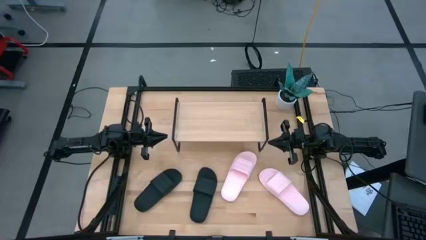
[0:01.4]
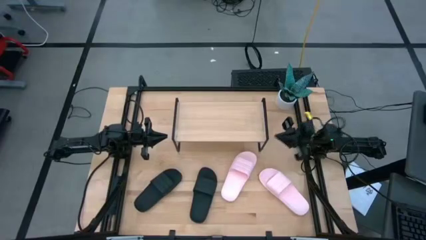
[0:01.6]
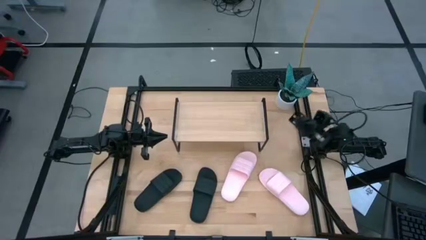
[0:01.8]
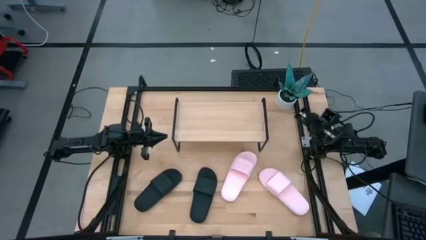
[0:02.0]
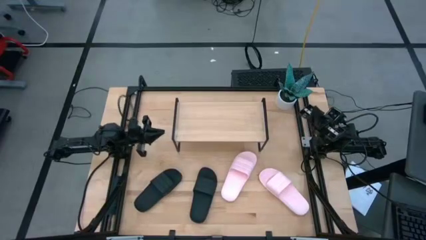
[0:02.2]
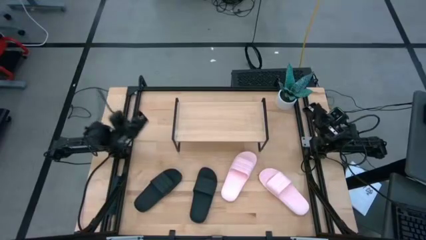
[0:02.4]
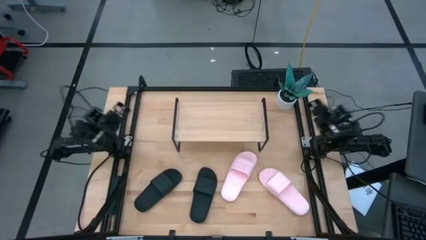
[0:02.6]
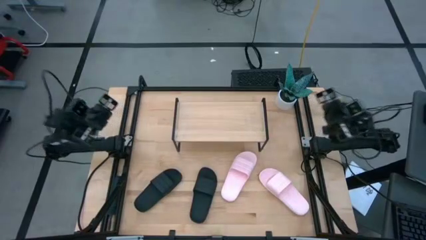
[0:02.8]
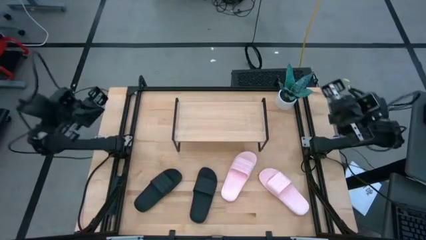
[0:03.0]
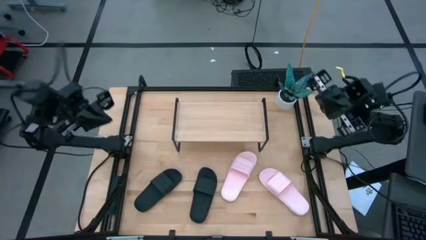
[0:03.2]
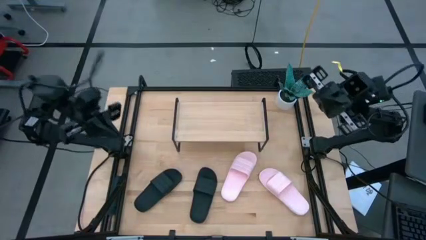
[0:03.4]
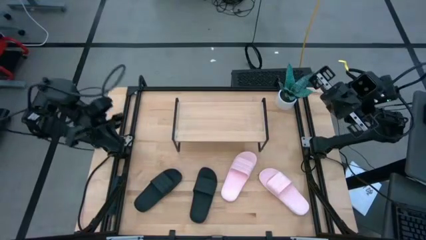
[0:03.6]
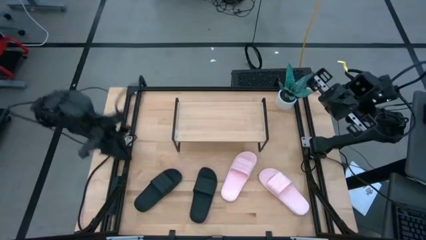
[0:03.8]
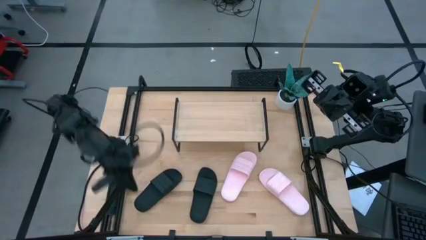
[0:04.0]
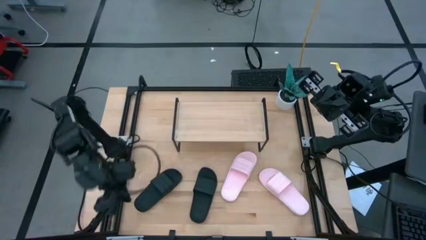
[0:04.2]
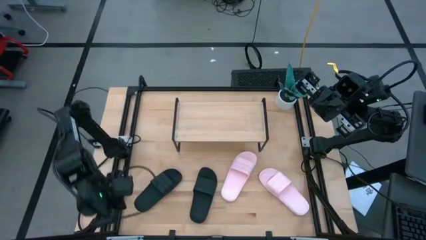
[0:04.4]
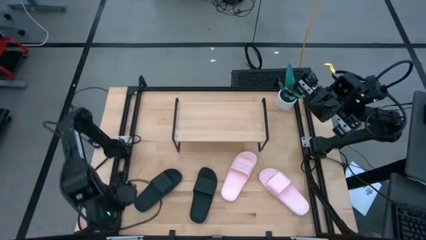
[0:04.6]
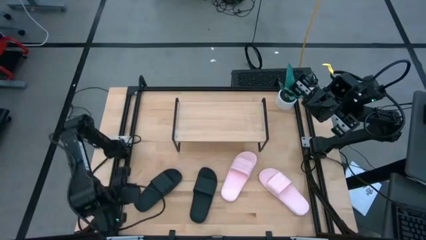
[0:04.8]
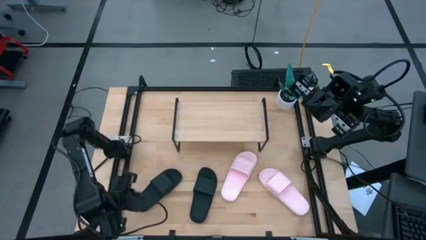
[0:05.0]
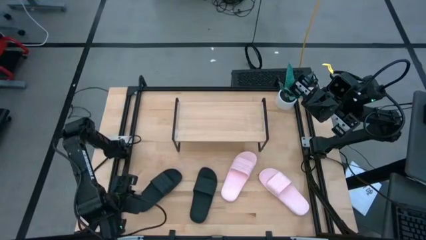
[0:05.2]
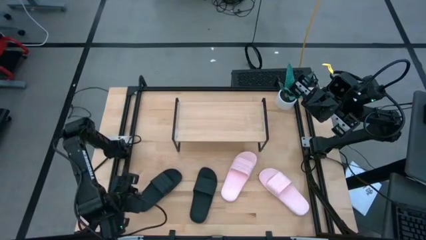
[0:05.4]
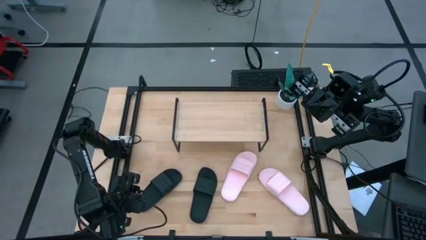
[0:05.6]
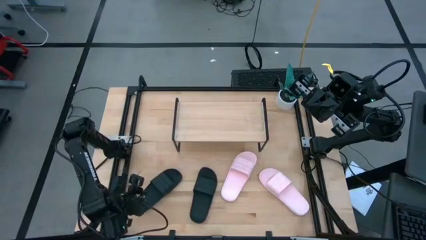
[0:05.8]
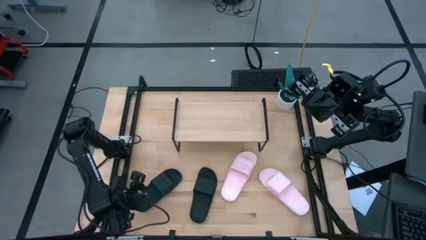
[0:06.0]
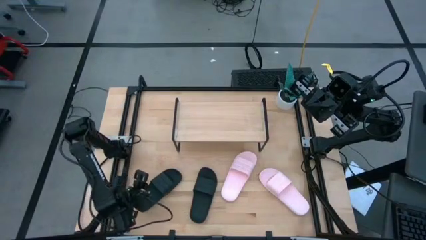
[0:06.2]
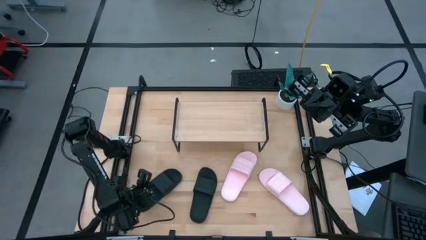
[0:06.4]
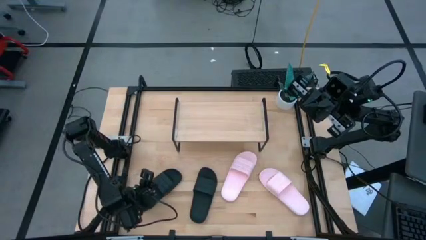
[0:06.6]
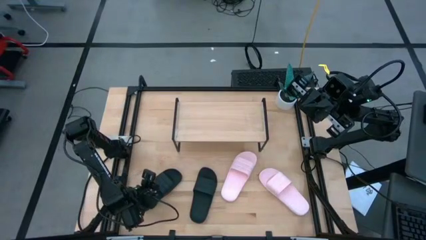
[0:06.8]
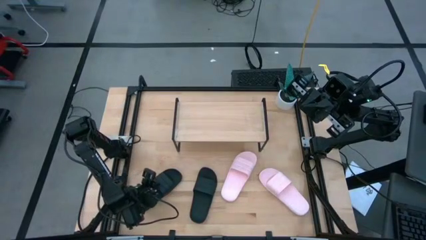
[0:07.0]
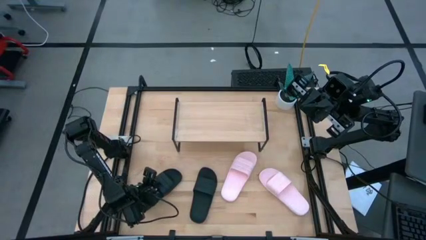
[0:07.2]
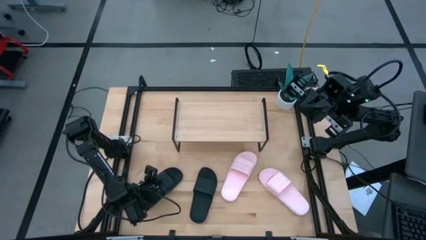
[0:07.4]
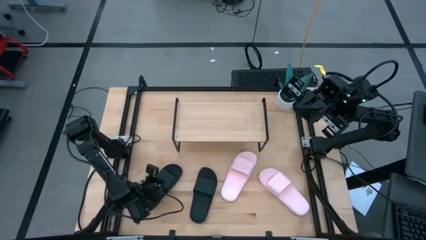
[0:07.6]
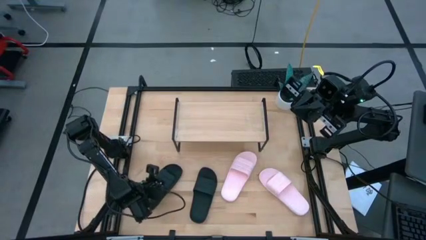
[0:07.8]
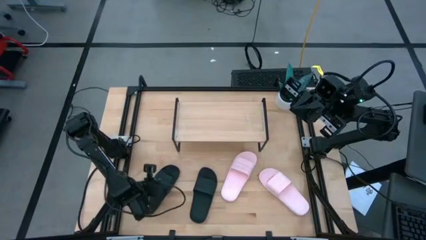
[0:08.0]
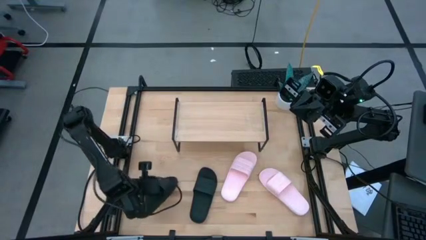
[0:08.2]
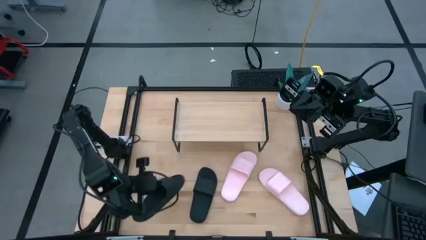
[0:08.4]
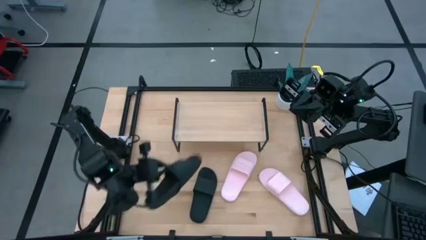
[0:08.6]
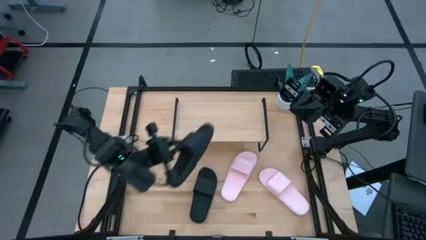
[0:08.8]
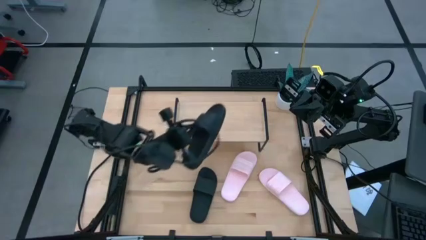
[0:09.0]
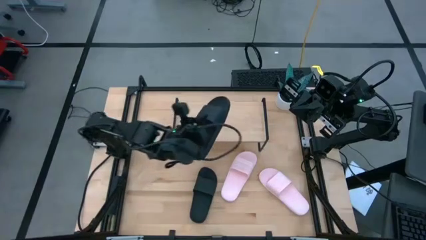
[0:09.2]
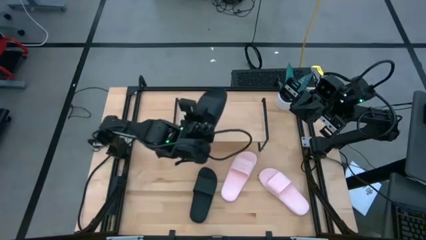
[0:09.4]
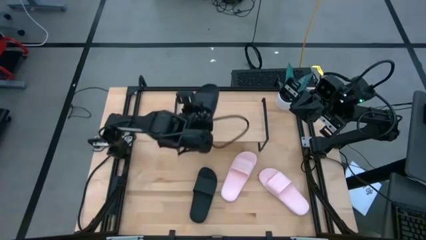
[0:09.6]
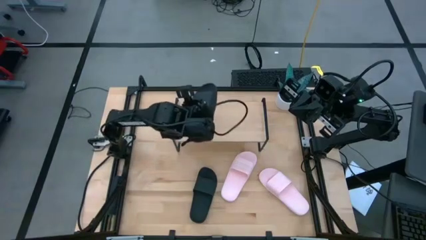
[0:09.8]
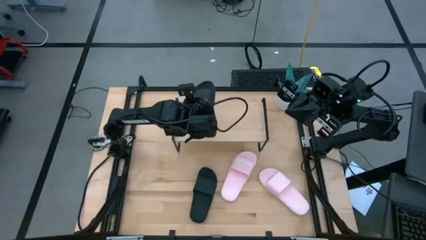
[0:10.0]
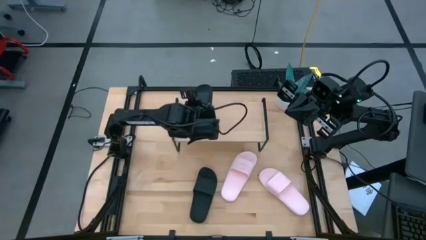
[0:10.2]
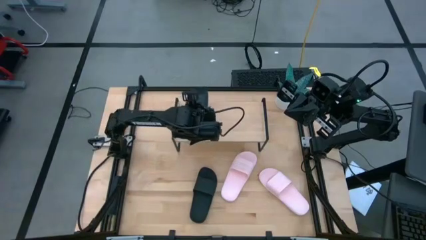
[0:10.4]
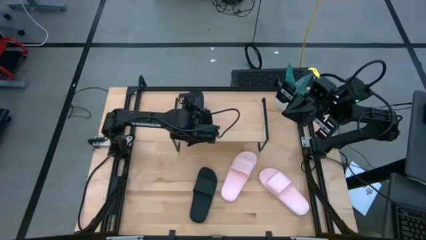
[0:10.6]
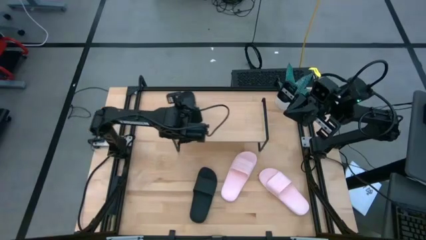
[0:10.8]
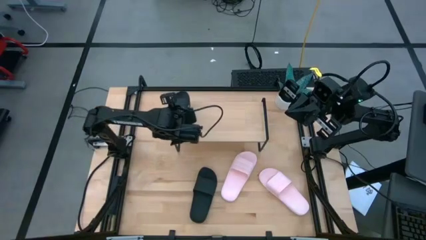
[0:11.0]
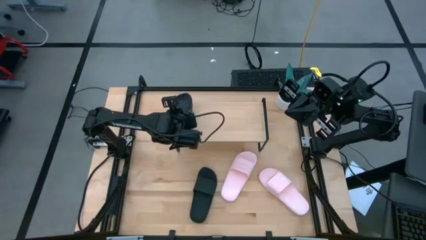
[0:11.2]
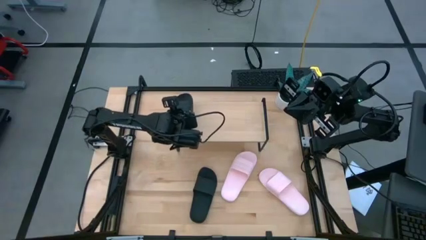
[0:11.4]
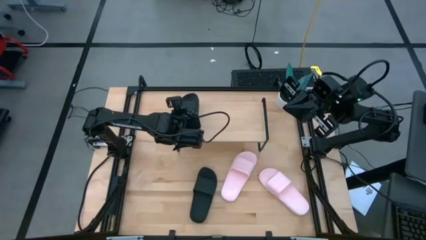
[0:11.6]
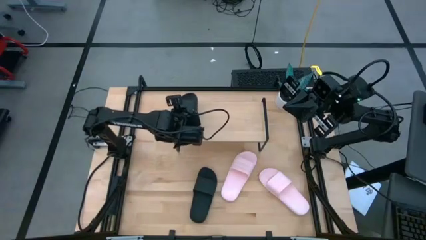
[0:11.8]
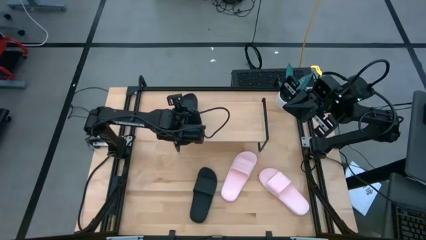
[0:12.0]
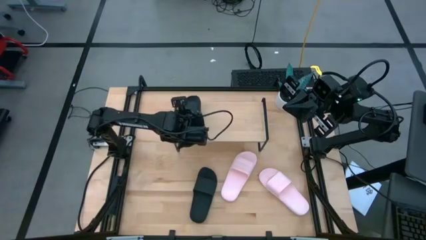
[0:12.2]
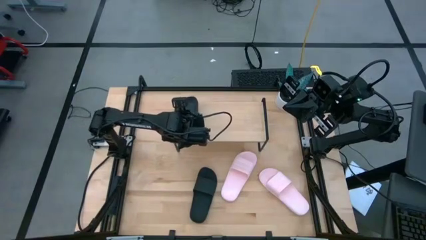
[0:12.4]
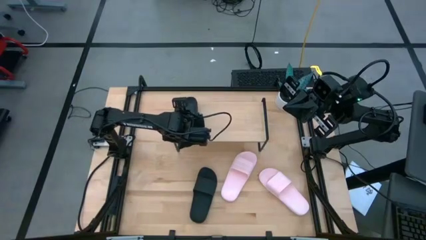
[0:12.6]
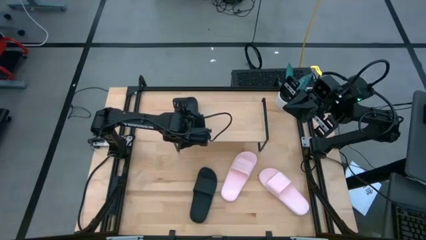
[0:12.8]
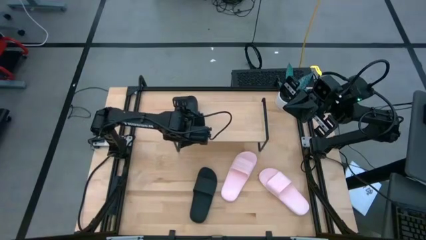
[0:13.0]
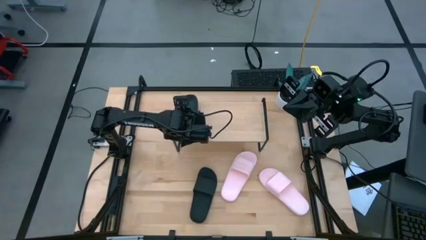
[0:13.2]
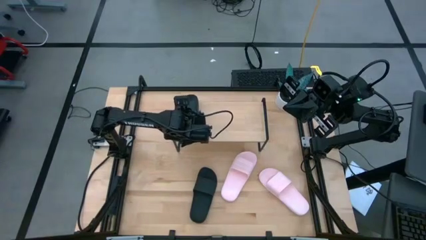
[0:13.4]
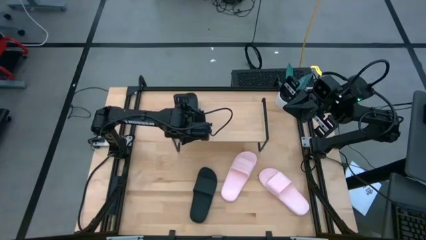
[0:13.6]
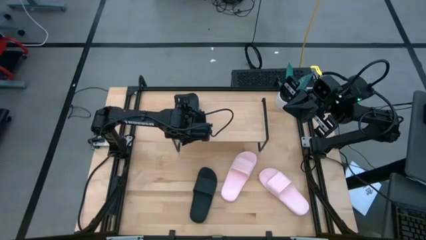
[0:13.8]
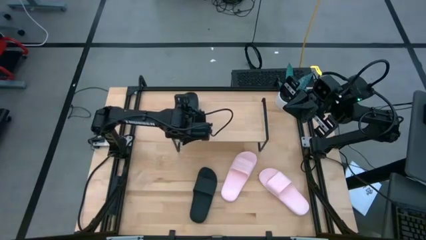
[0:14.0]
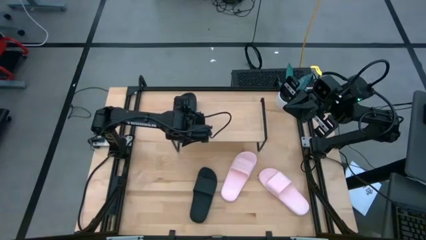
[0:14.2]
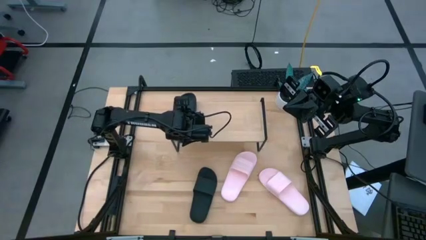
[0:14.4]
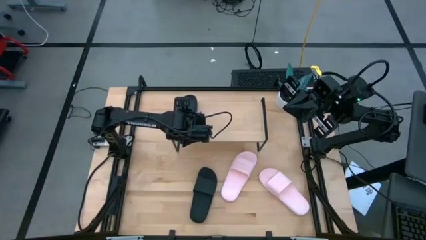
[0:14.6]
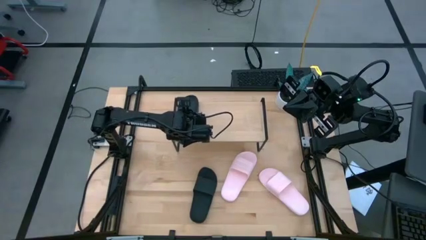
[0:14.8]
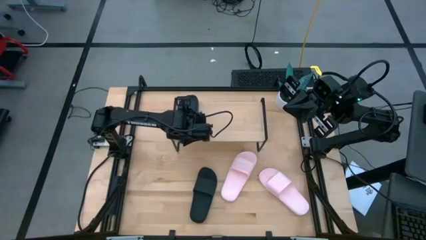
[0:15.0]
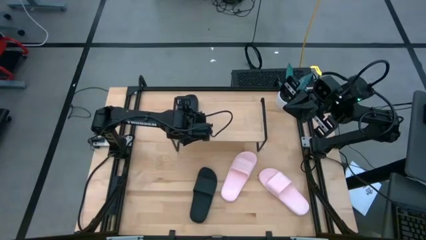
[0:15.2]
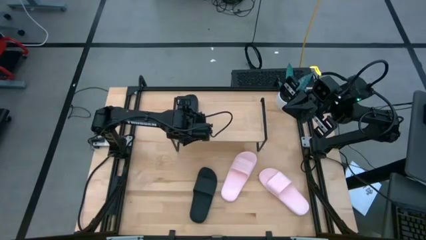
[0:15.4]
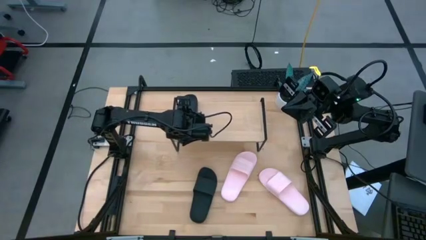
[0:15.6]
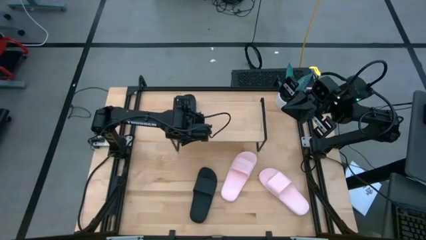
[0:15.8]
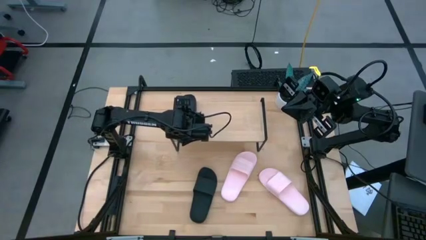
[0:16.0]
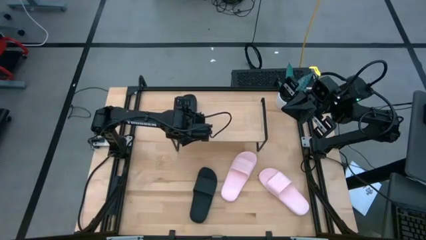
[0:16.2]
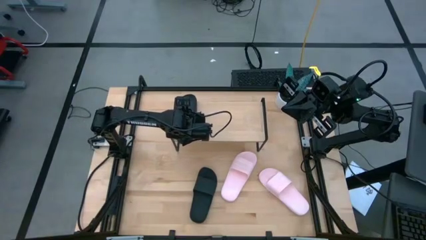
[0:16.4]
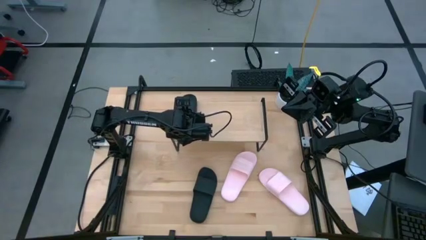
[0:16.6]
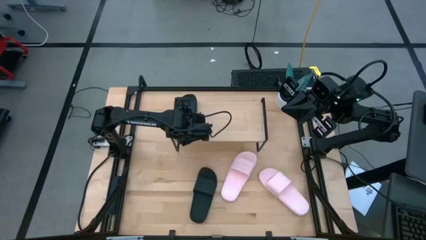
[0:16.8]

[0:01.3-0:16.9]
Task: Pick and place slides into the shelf
Put the left black slide on the shelf
